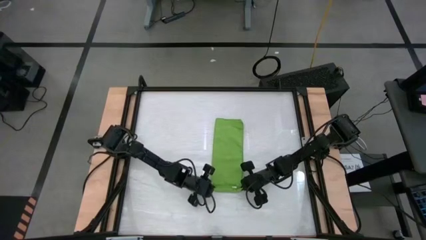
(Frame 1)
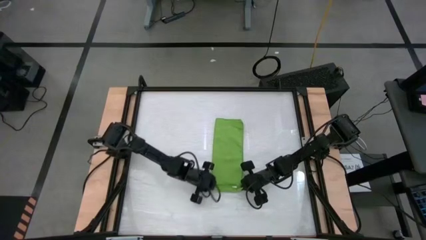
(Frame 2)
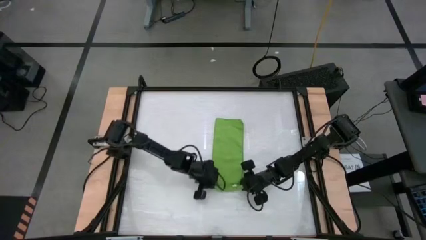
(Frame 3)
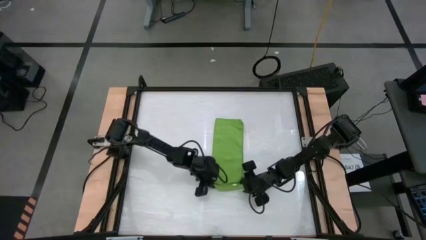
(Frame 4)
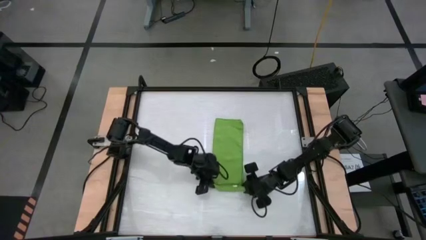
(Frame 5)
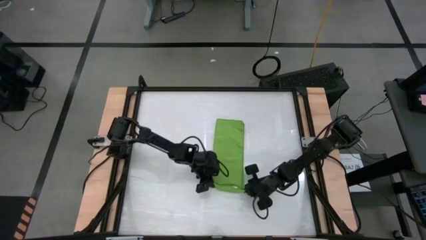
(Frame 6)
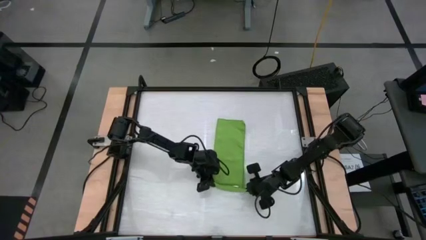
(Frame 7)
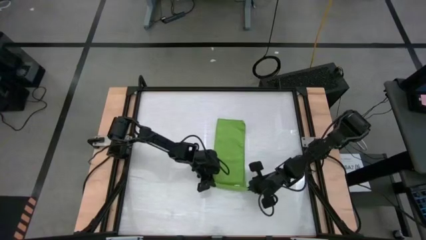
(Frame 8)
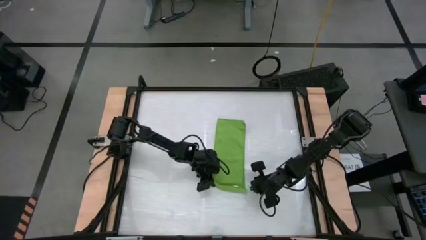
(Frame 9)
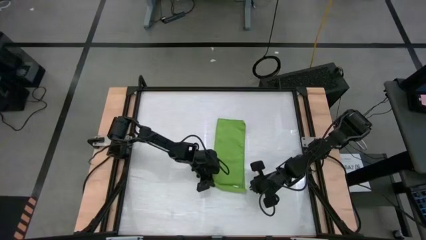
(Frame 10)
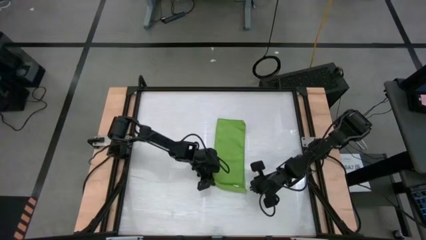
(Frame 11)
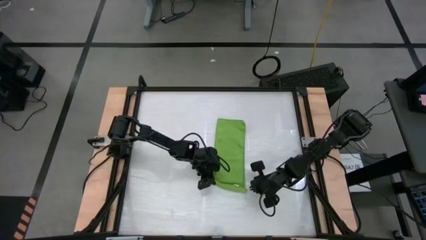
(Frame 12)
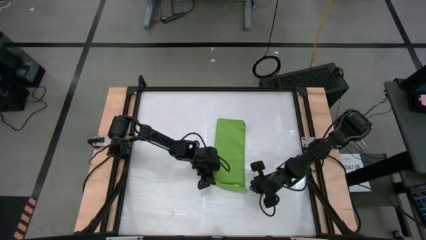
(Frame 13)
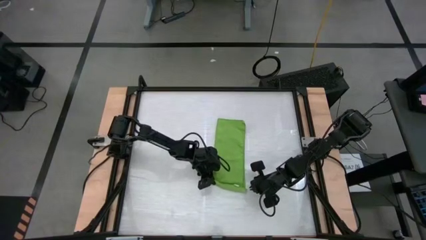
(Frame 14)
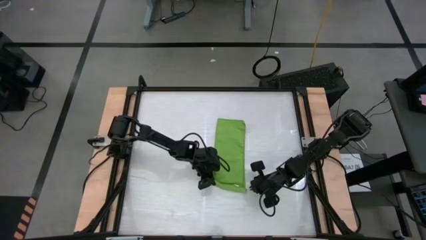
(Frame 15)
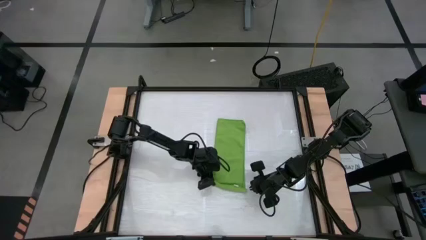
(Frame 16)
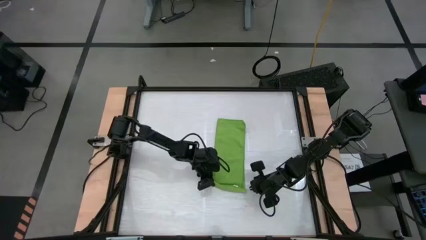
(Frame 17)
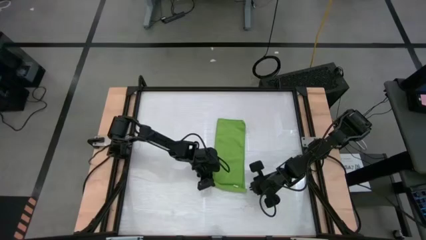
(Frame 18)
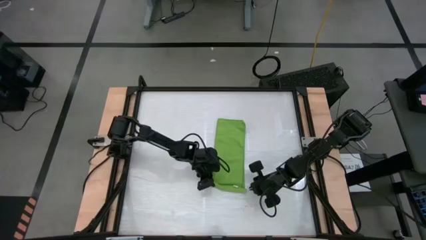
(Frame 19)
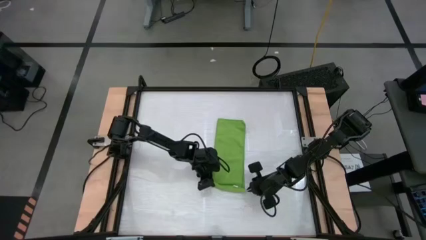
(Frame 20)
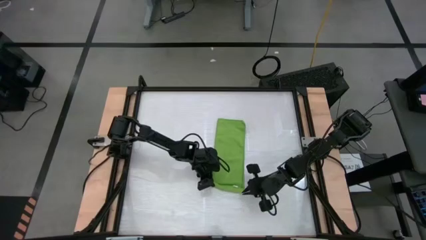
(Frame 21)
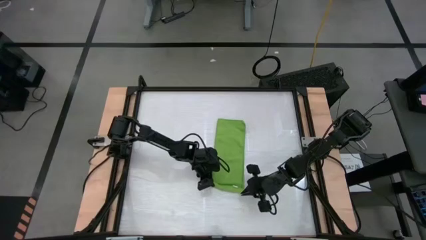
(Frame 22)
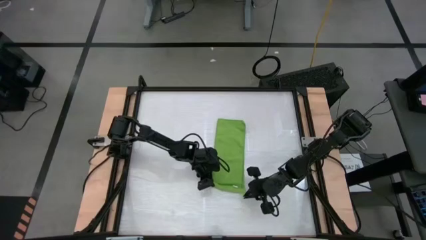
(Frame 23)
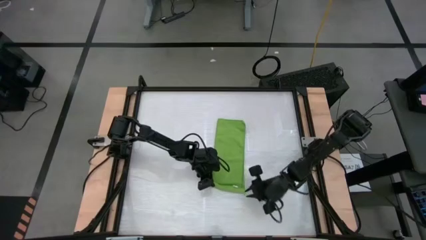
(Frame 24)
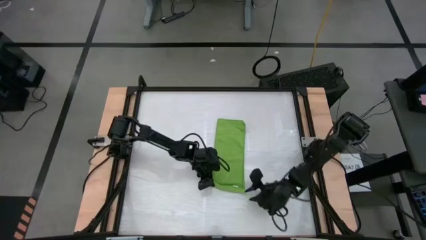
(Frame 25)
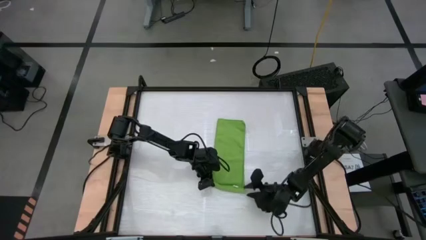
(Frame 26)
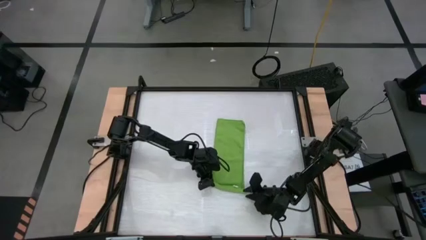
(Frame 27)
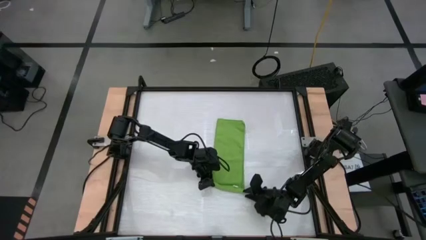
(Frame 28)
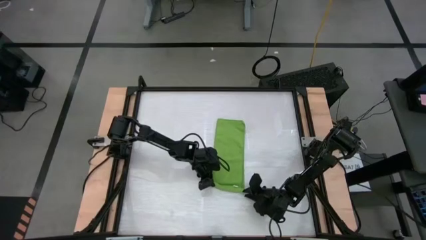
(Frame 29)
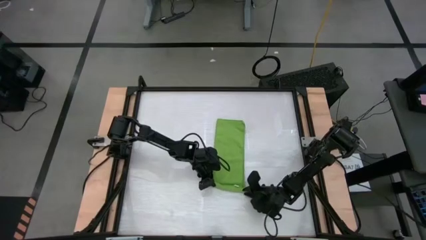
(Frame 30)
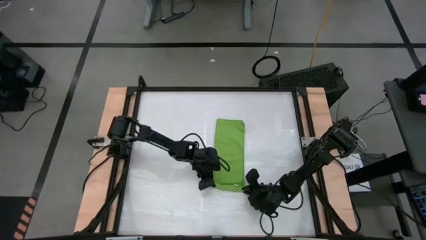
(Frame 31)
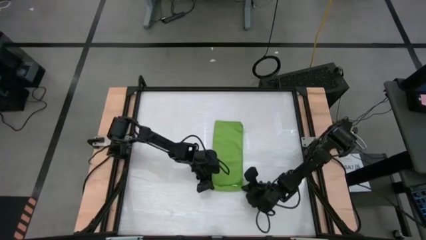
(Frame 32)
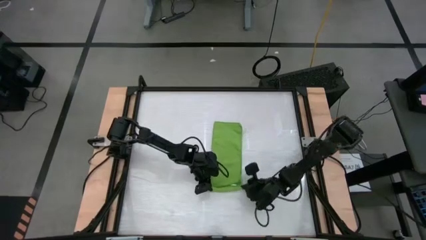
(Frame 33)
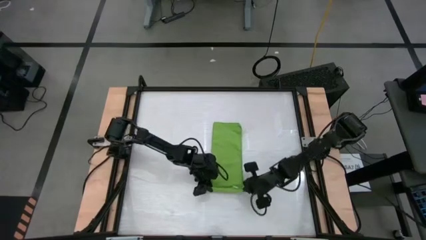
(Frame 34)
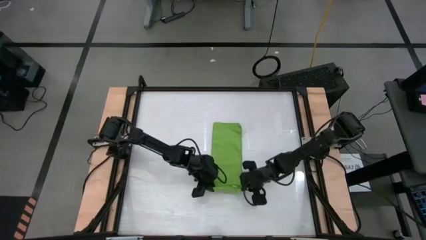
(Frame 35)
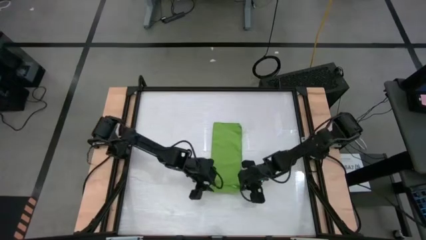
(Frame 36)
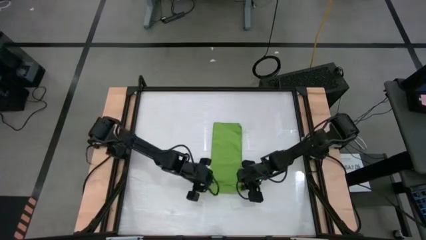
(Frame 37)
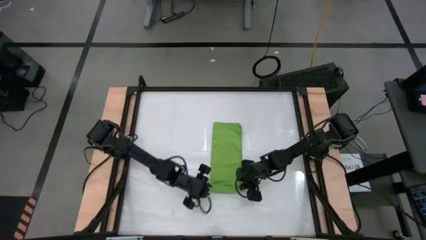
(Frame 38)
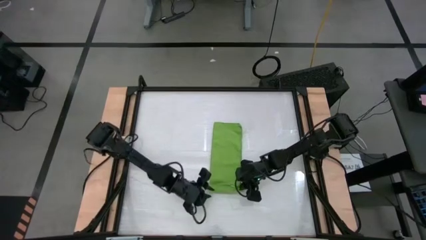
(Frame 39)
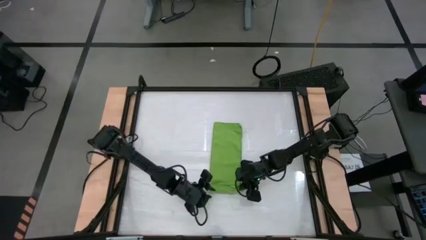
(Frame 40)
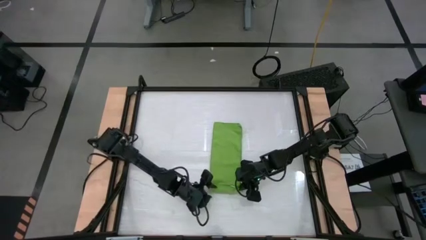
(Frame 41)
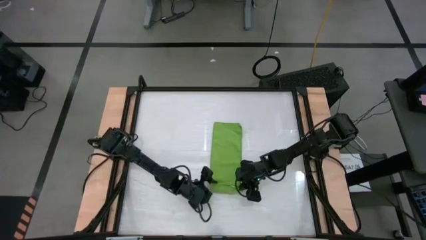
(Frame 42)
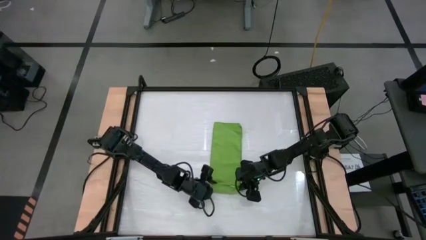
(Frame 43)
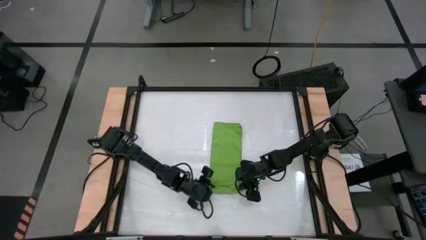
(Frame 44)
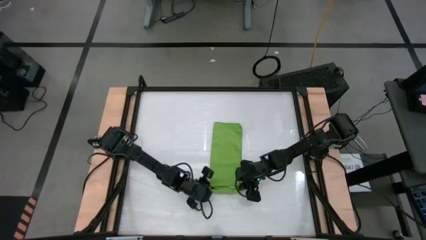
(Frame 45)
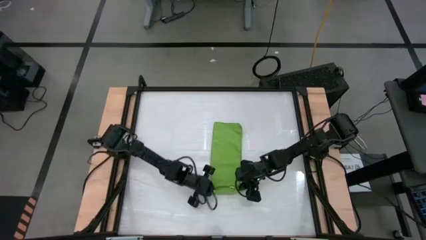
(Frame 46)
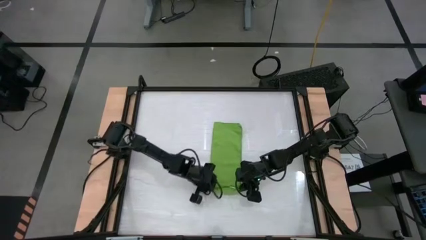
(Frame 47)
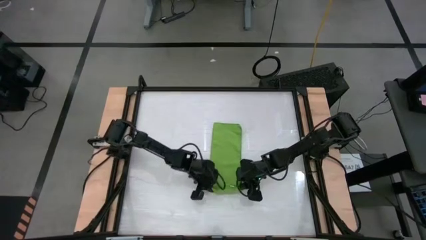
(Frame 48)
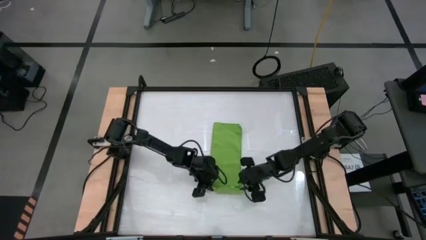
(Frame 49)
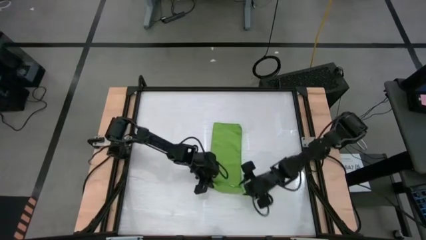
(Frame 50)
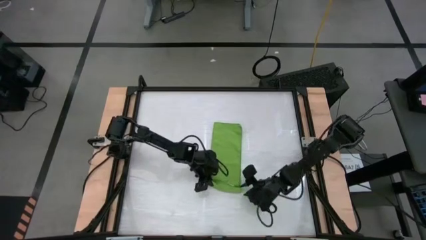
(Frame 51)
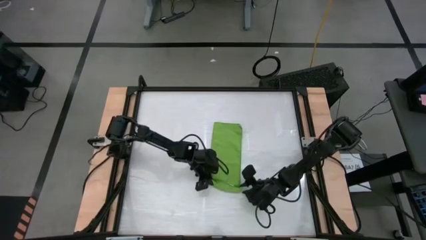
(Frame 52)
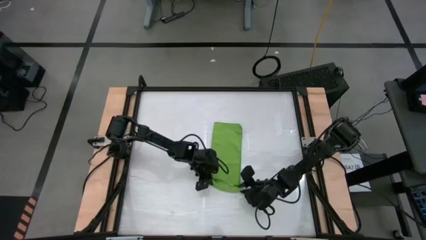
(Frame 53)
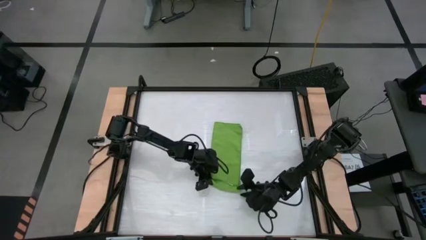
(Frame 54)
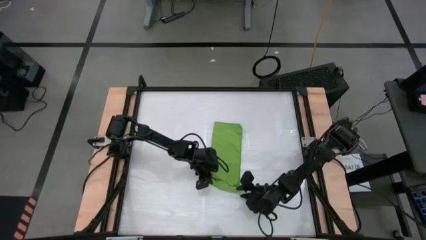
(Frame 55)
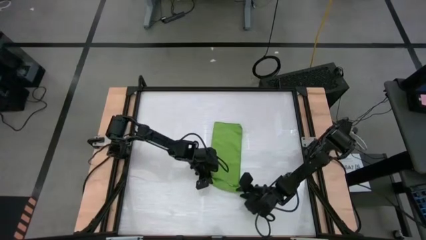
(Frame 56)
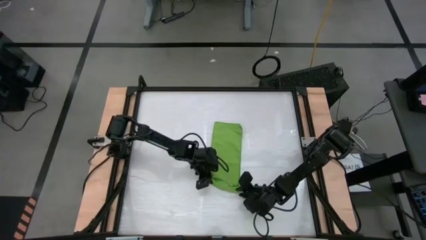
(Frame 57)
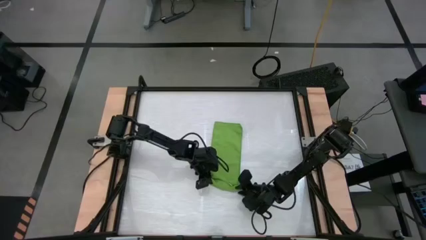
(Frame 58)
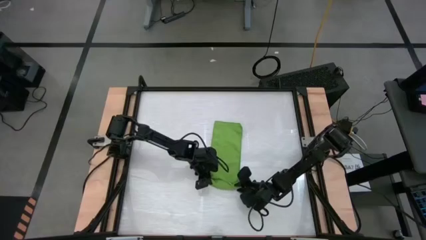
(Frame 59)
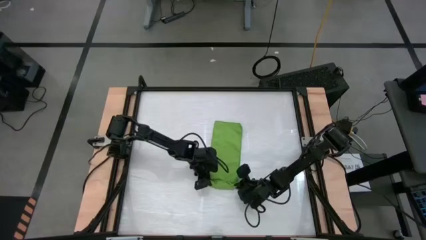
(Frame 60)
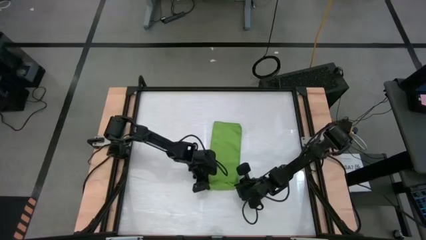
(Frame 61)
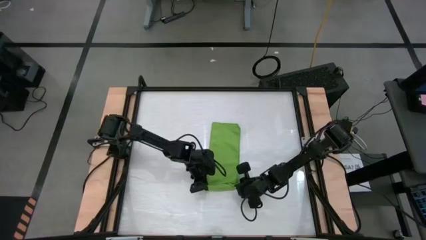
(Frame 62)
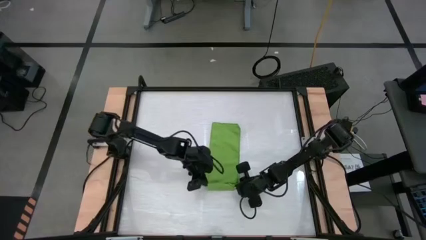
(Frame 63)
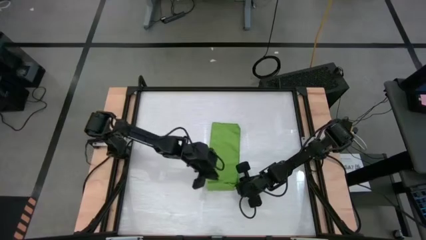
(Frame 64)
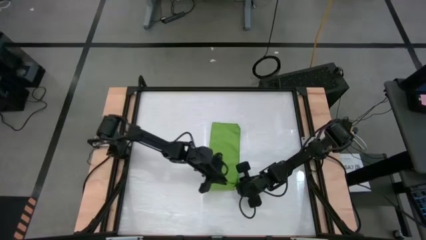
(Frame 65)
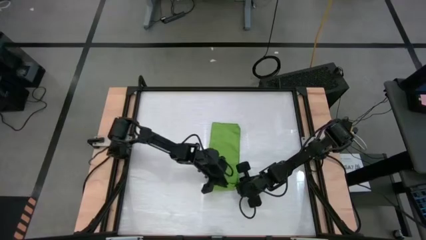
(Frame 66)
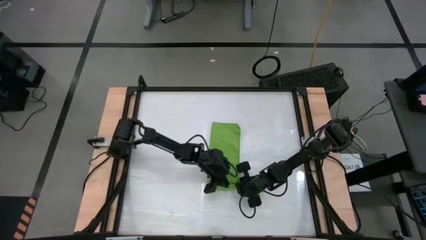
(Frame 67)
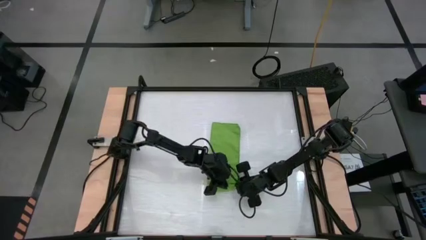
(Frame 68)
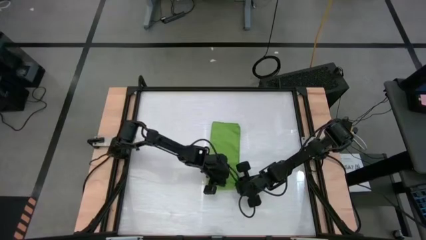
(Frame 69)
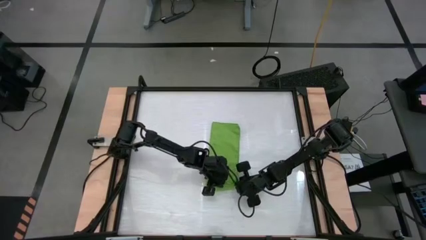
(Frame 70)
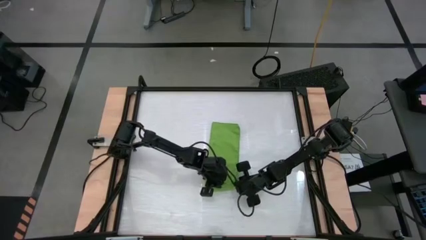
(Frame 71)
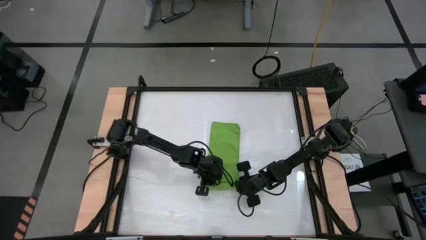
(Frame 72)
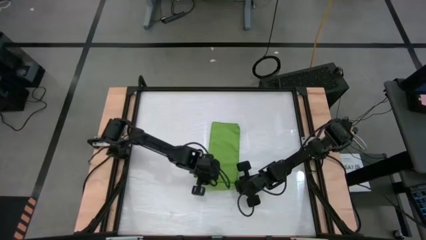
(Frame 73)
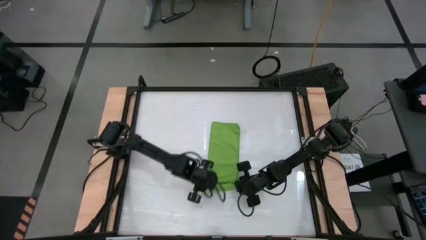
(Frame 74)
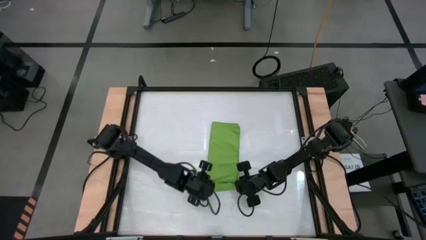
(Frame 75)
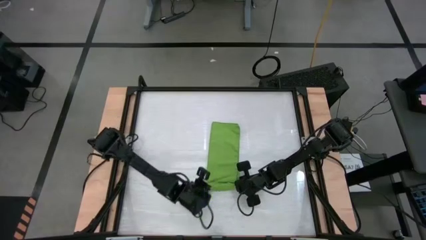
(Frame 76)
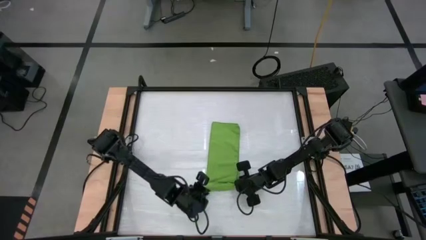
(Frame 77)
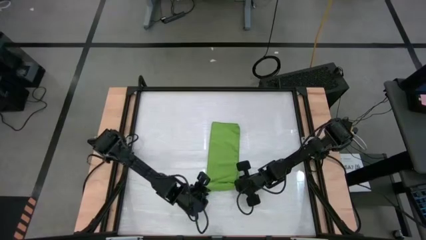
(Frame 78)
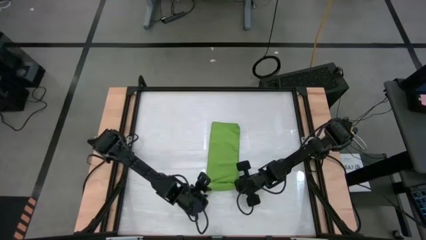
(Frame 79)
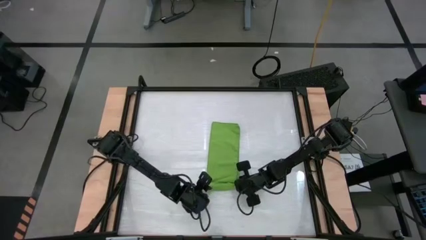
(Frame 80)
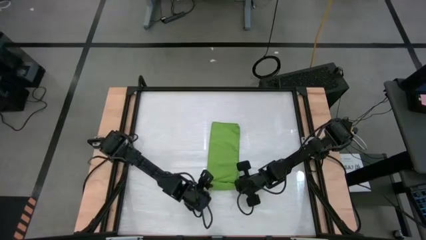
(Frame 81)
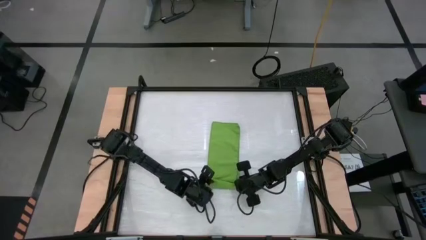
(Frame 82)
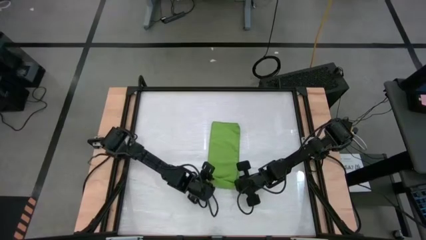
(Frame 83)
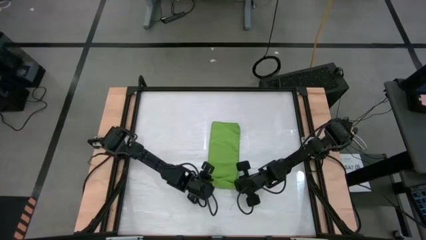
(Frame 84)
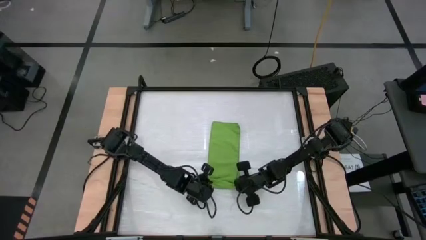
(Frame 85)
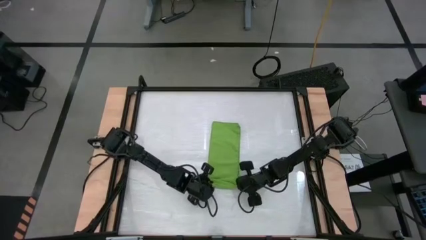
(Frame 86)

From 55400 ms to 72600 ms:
Task: Roll towel
Roll the green microfiber cloth
